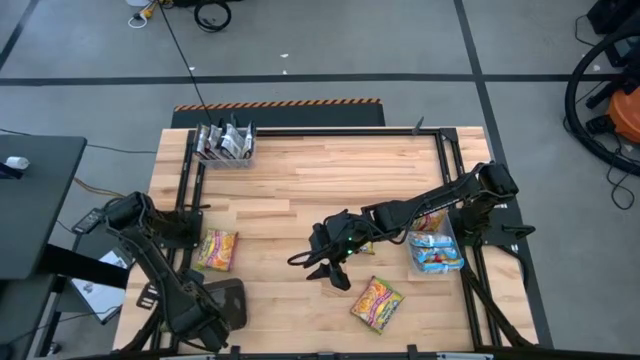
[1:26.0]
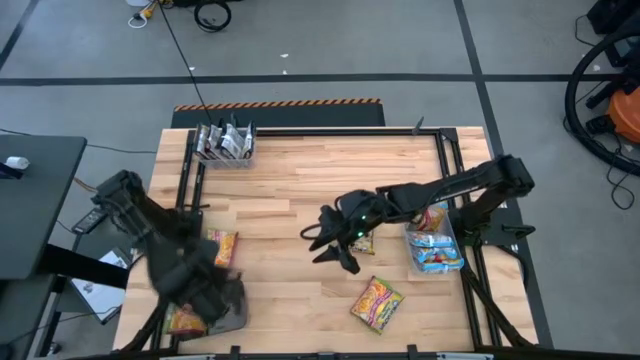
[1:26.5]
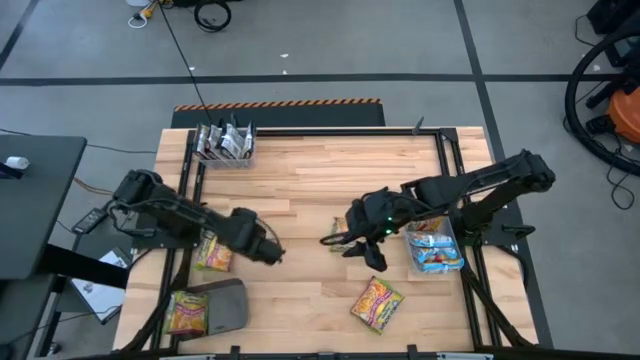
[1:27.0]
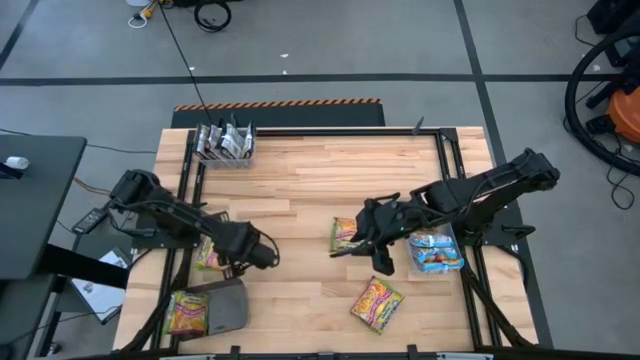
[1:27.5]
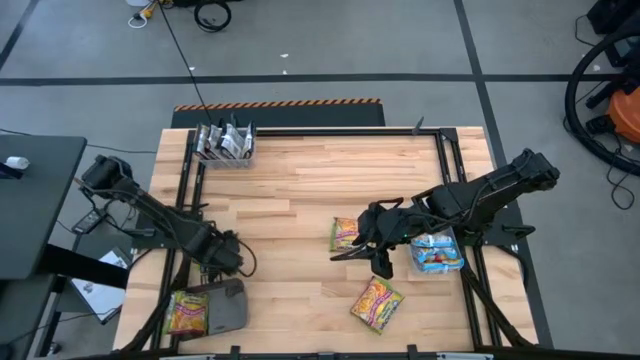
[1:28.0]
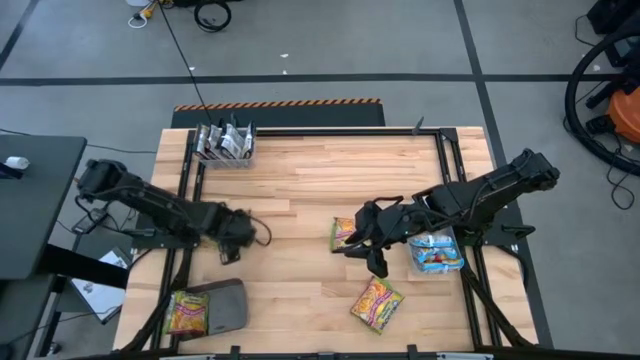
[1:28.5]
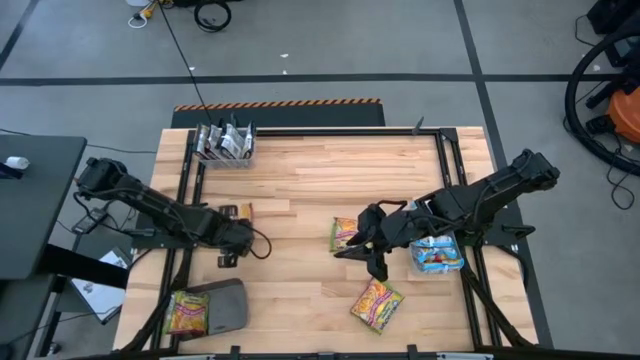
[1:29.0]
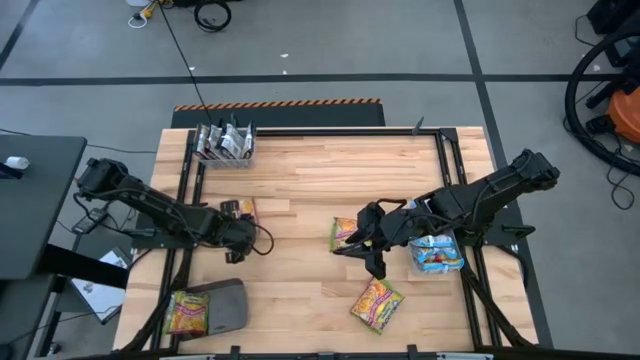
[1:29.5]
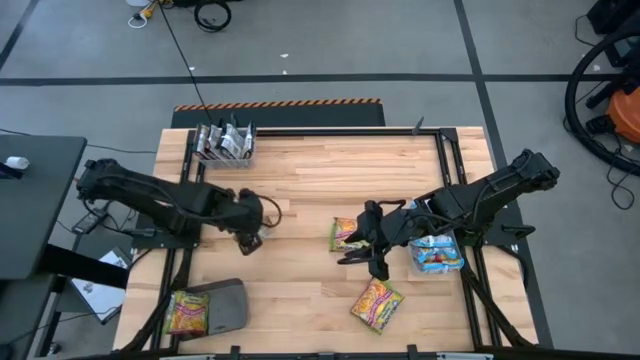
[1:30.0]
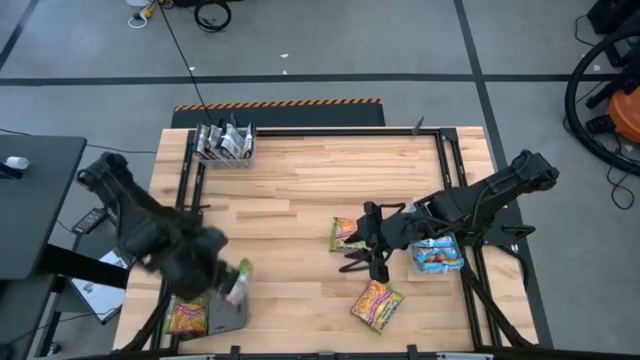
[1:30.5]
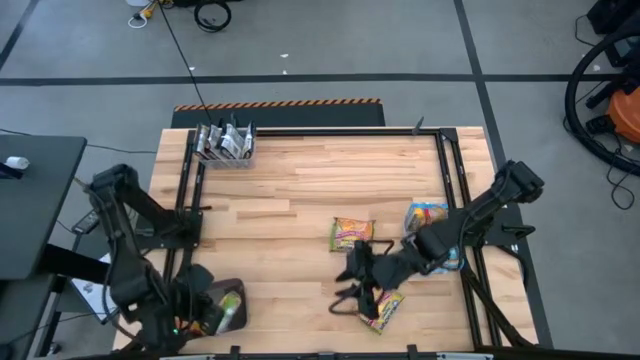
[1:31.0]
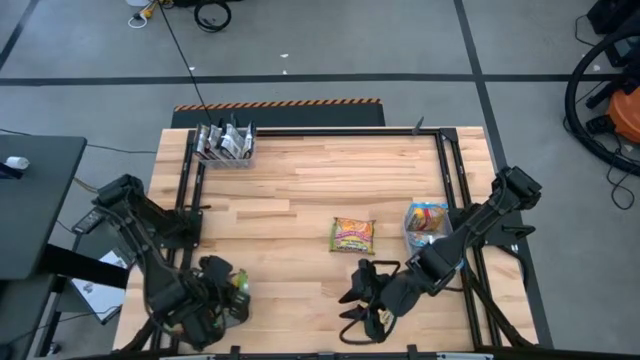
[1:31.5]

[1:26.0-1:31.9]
Task: Sort Maruchan noodles
Put the green noodle pack into the black bin

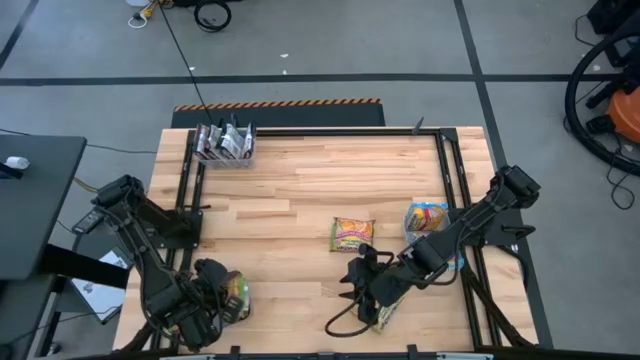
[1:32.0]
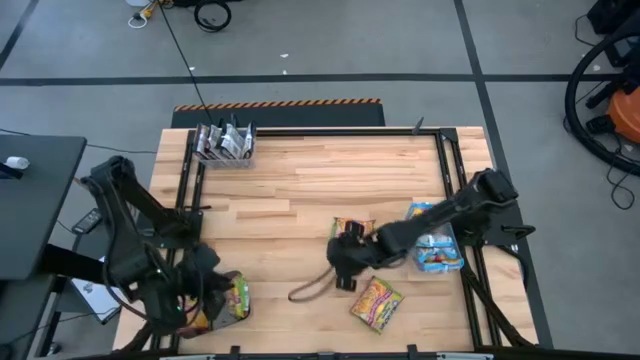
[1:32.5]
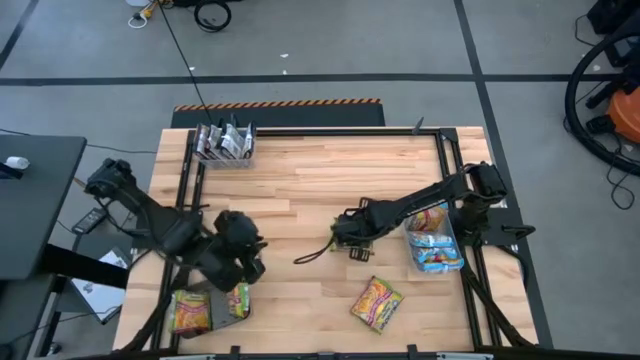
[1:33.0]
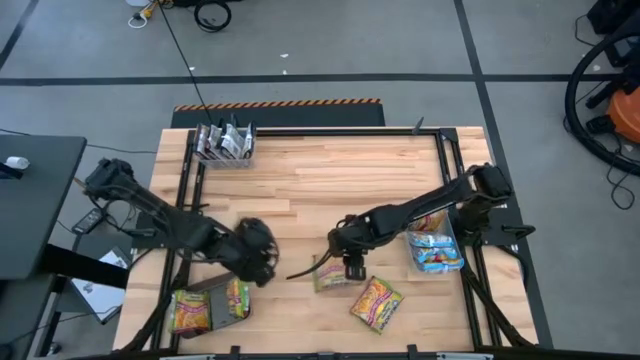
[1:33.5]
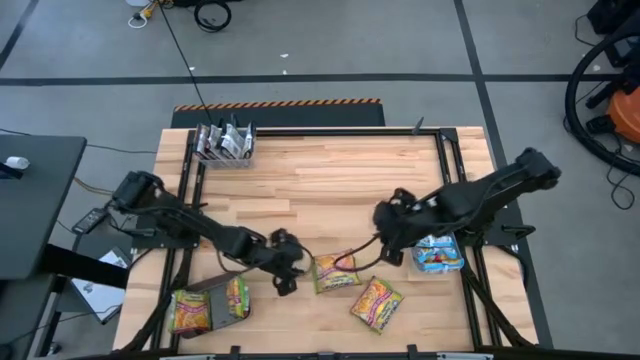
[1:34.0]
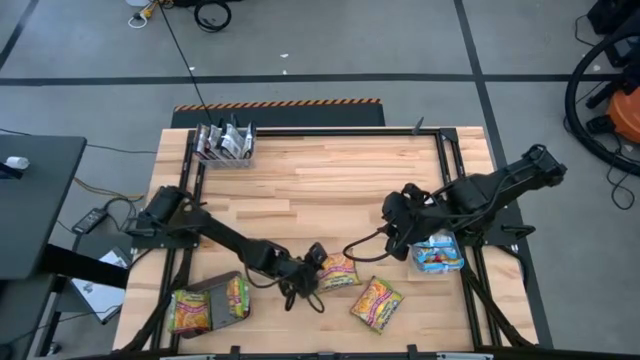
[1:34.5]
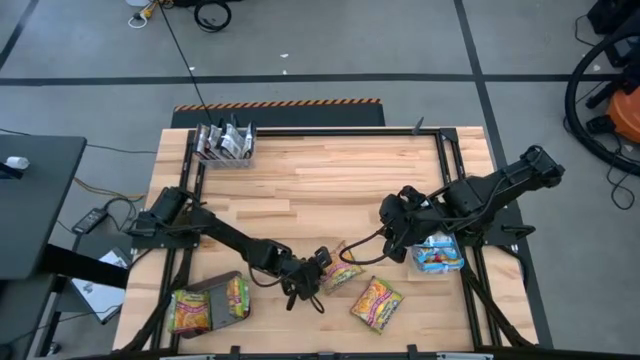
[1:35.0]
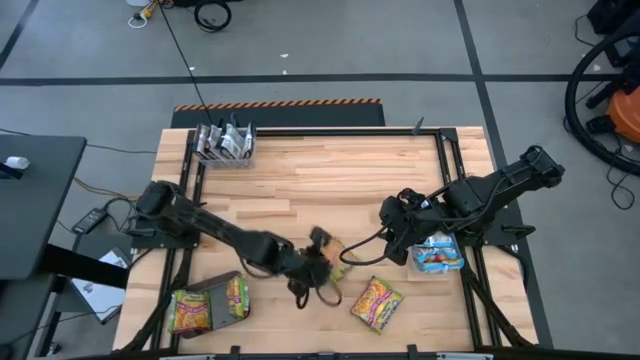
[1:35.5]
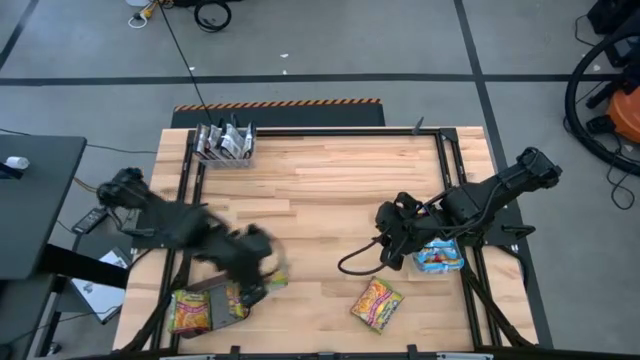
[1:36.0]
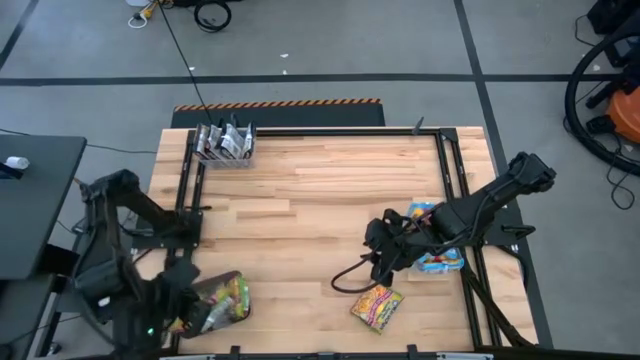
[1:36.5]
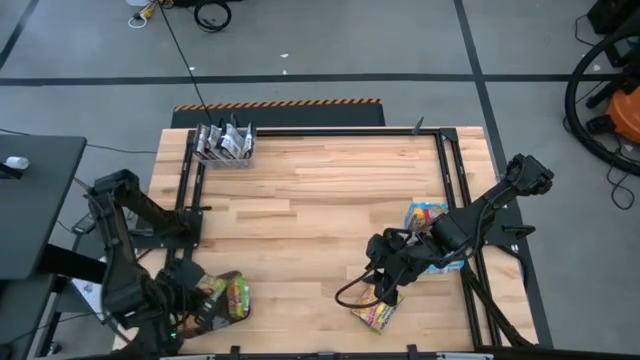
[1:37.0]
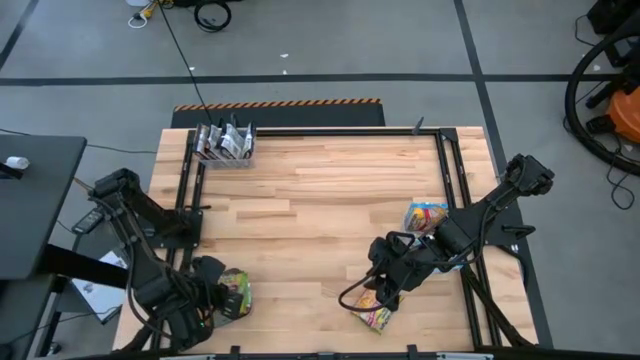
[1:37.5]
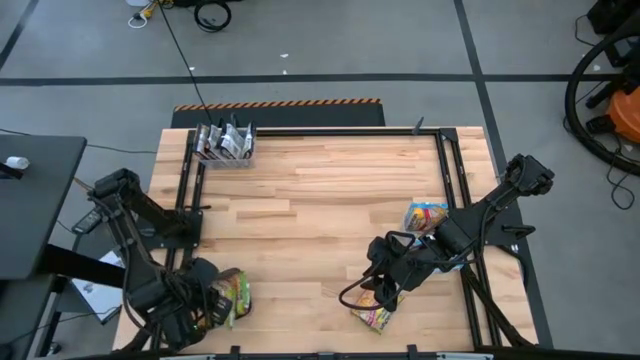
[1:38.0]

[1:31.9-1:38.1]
Put the green noodle pack into the black bin

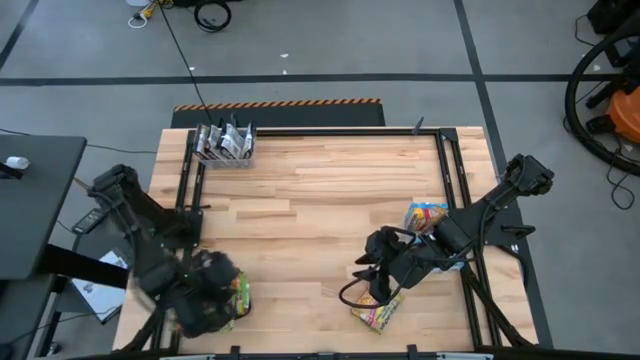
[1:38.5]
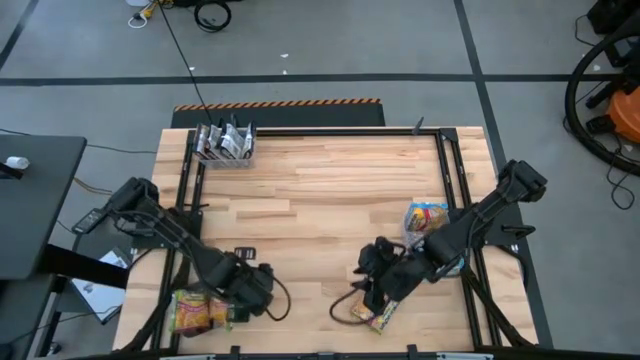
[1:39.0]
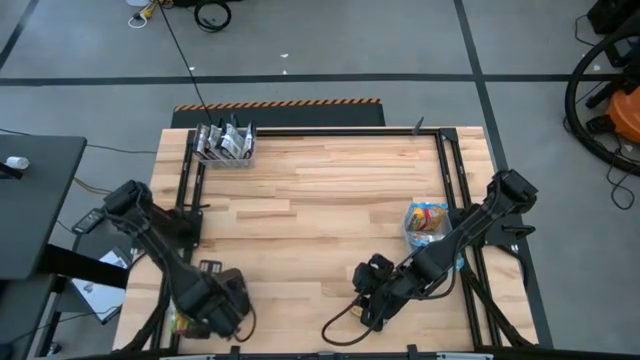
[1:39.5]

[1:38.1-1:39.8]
Adjust the green noodle pack in the black bin

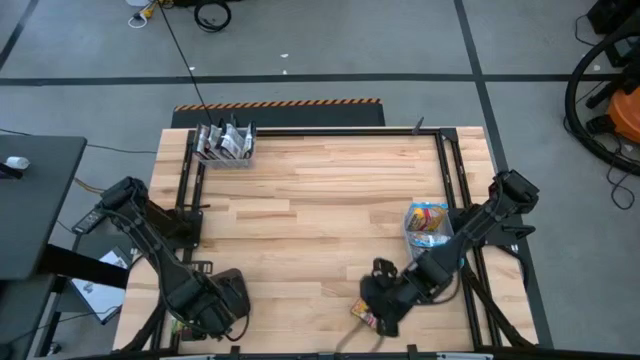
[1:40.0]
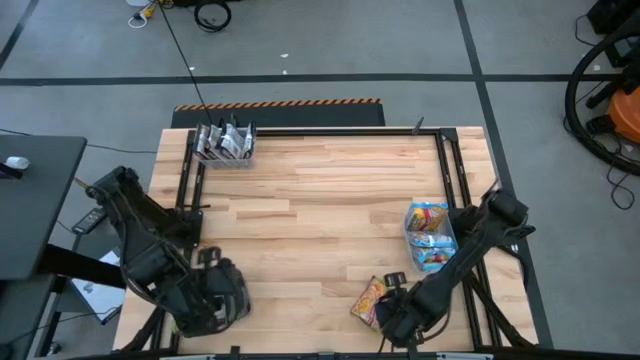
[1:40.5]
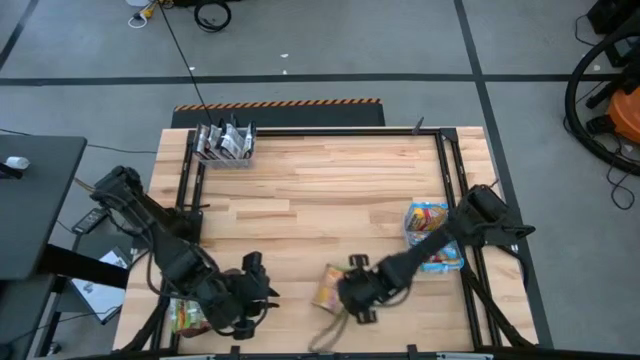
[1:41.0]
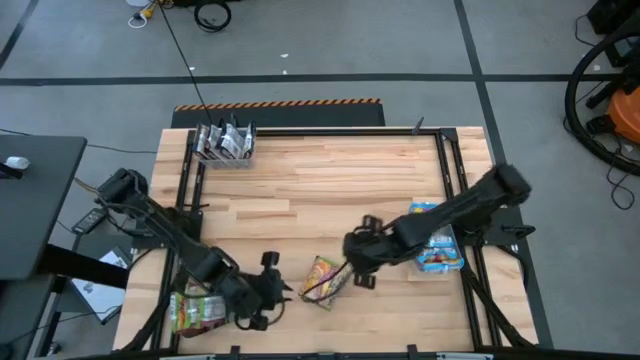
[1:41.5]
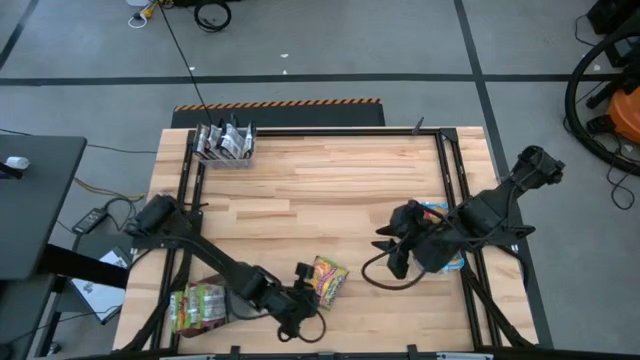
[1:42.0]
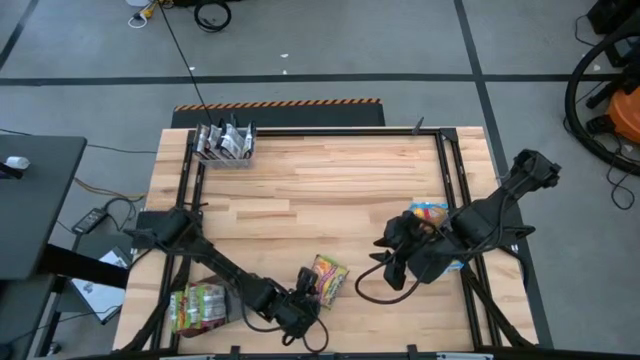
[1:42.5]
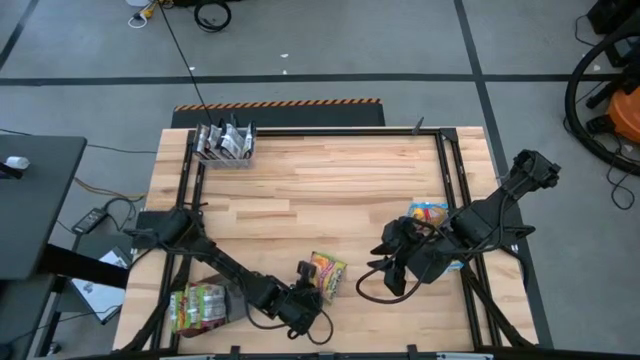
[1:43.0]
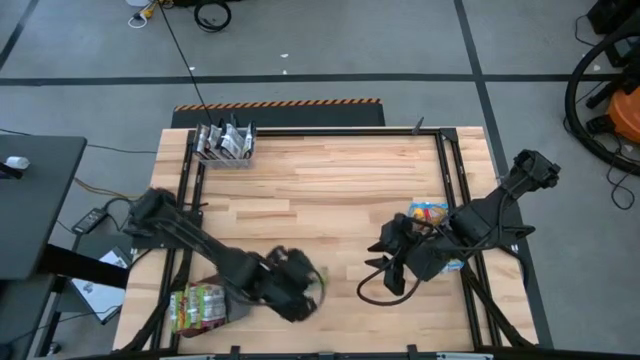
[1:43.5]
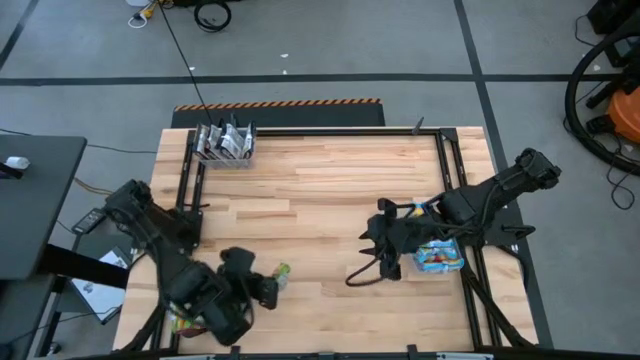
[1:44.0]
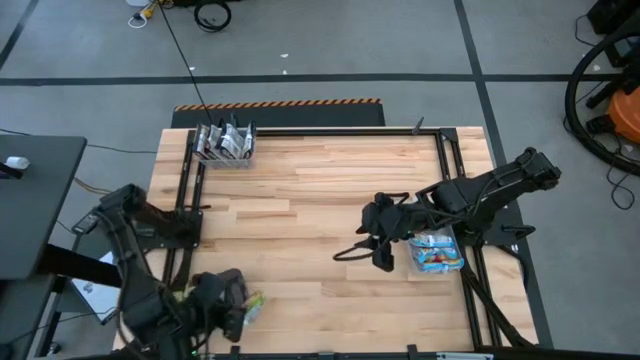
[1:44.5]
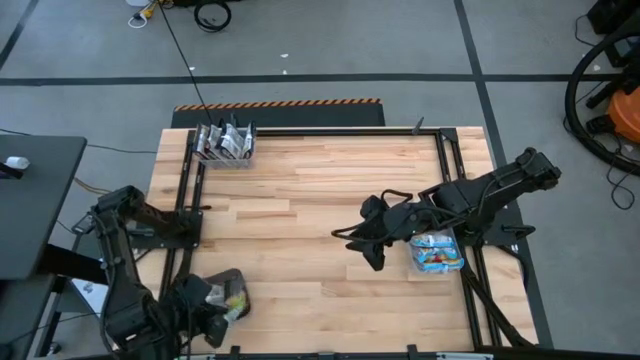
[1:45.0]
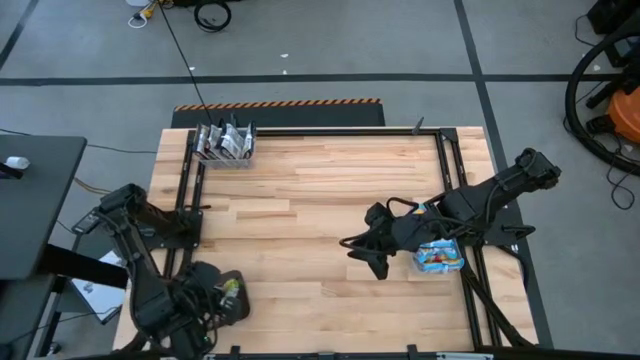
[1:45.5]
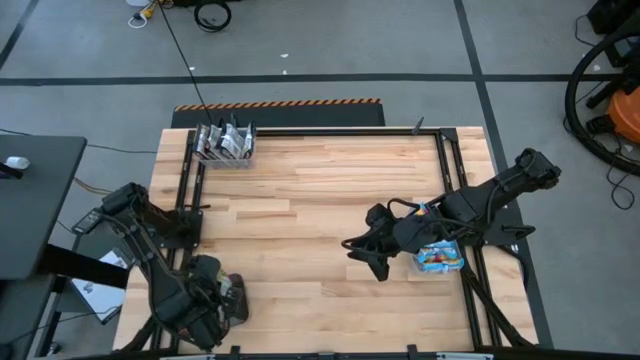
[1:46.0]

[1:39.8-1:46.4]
Put the green noodle pack into the black bin
